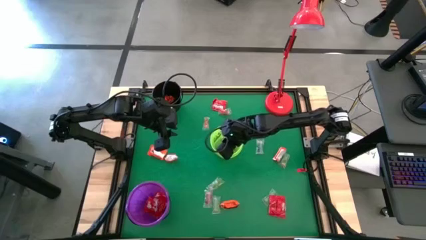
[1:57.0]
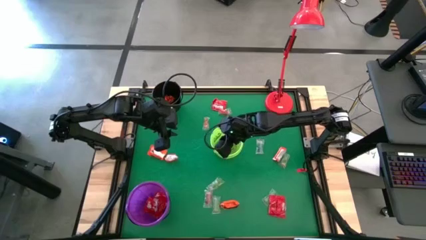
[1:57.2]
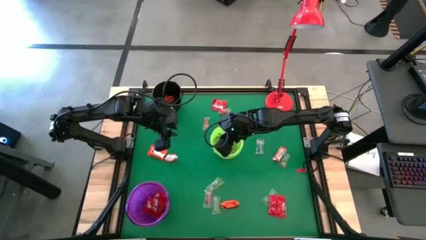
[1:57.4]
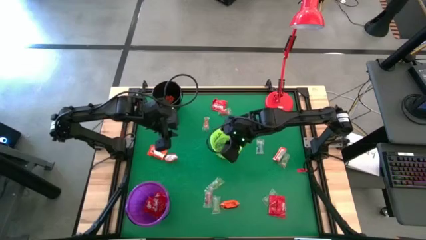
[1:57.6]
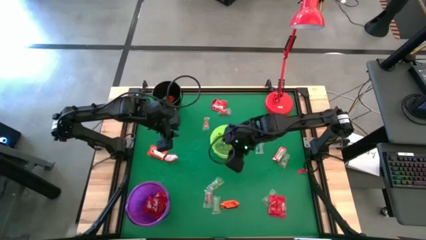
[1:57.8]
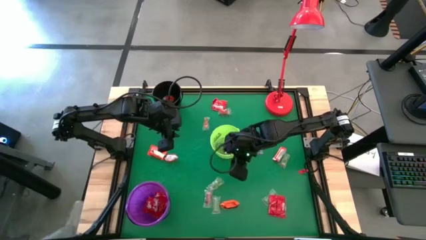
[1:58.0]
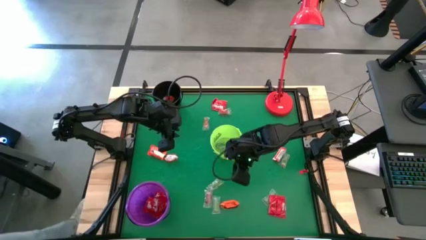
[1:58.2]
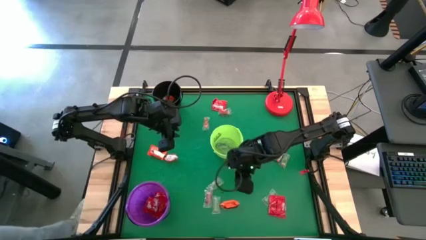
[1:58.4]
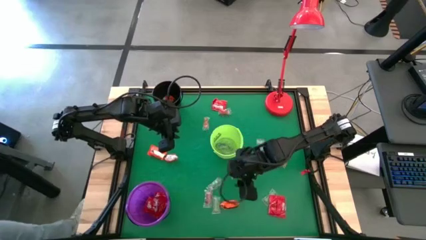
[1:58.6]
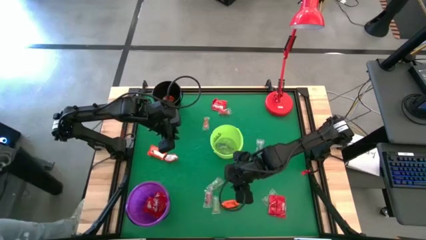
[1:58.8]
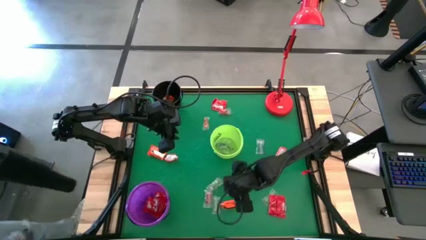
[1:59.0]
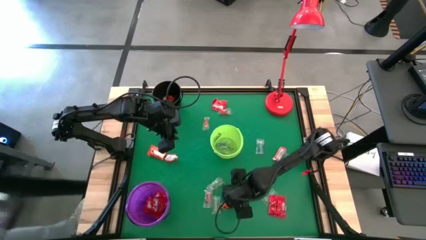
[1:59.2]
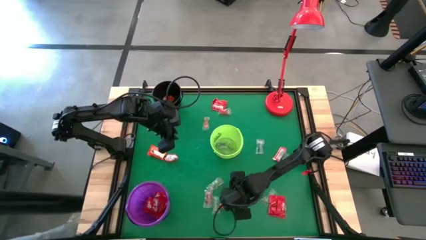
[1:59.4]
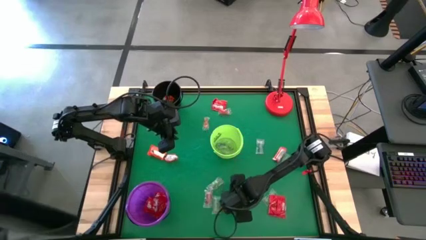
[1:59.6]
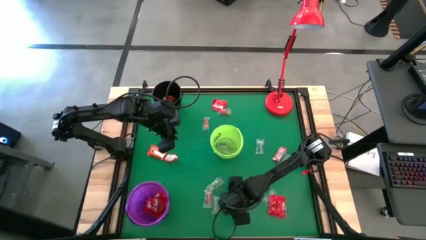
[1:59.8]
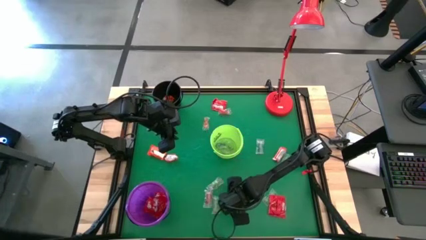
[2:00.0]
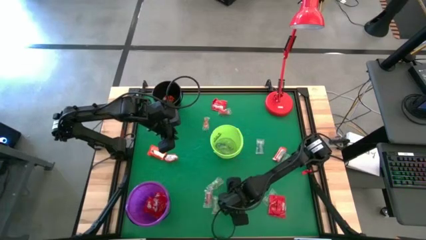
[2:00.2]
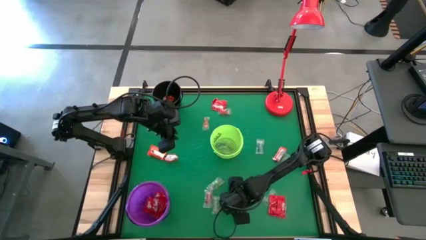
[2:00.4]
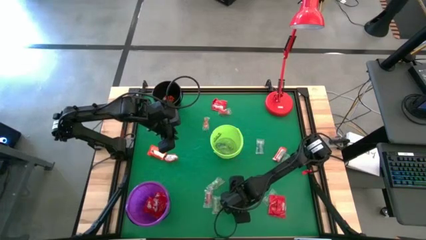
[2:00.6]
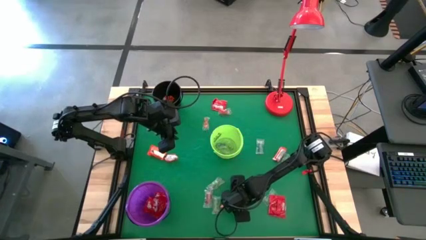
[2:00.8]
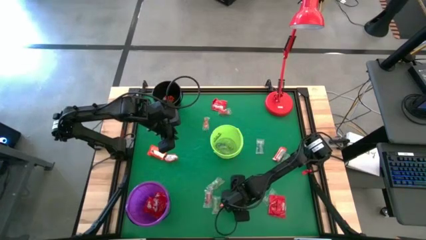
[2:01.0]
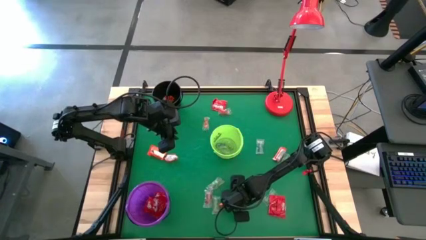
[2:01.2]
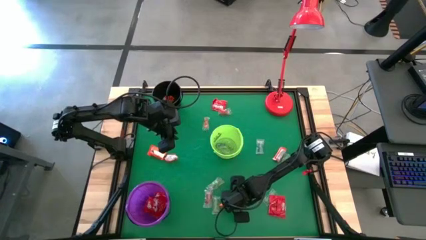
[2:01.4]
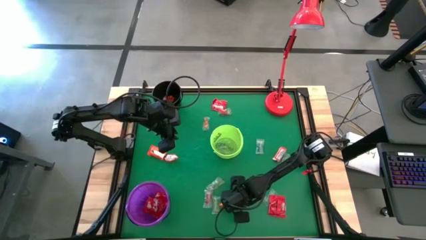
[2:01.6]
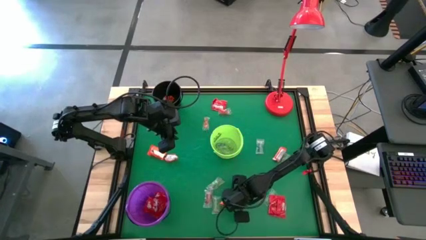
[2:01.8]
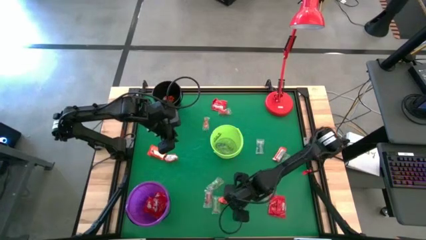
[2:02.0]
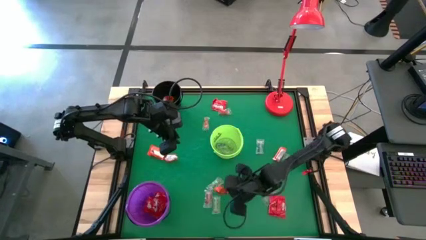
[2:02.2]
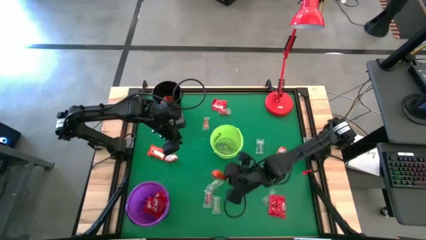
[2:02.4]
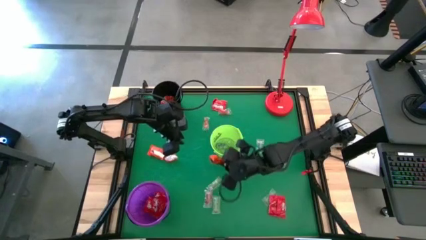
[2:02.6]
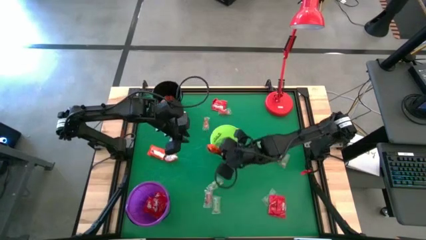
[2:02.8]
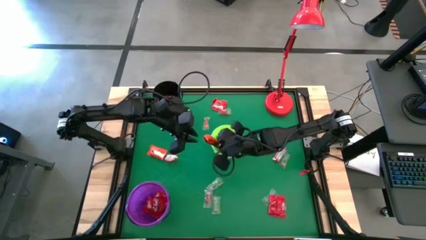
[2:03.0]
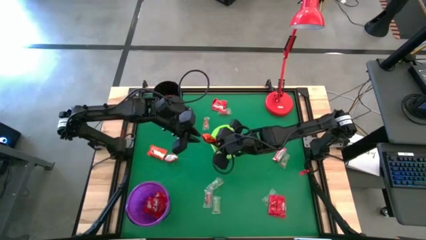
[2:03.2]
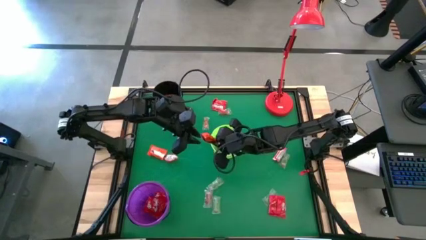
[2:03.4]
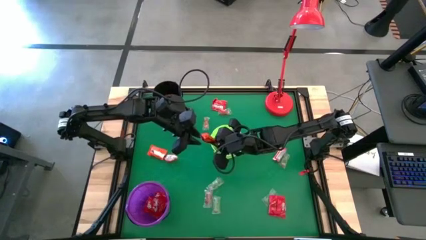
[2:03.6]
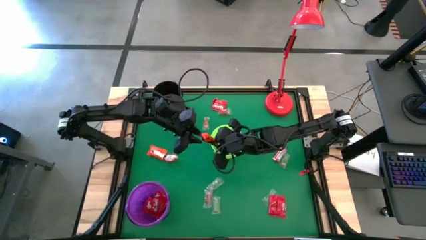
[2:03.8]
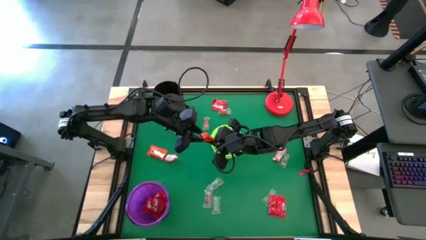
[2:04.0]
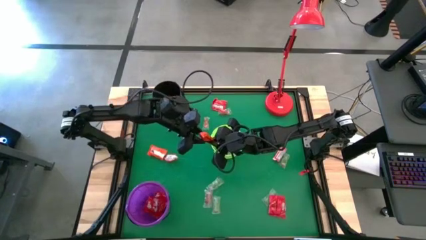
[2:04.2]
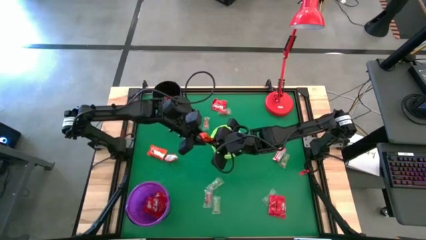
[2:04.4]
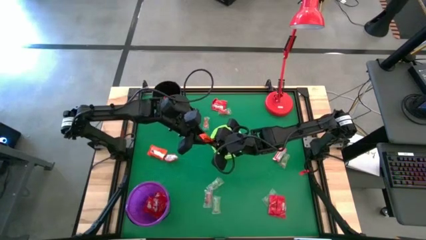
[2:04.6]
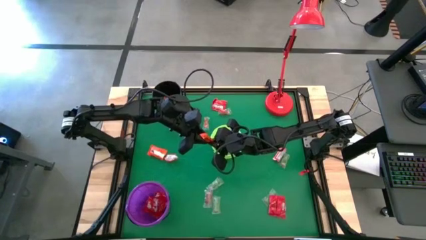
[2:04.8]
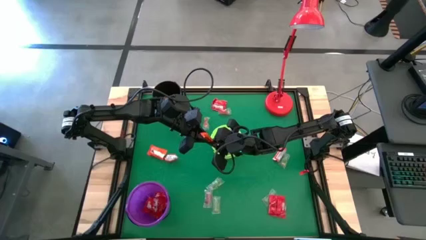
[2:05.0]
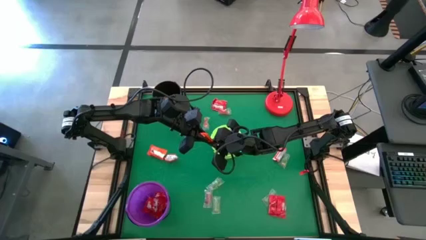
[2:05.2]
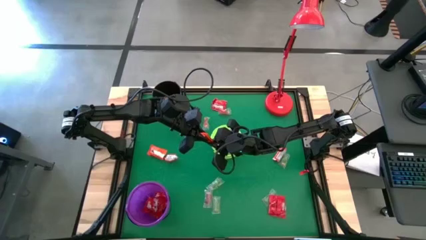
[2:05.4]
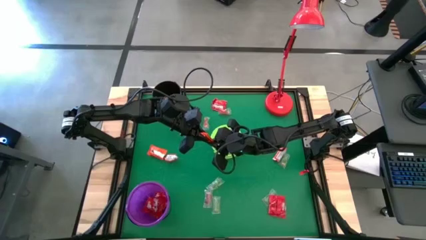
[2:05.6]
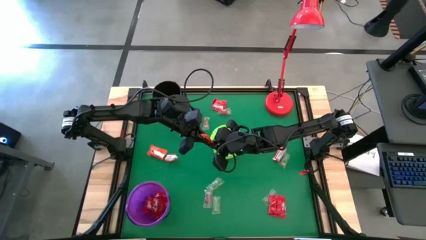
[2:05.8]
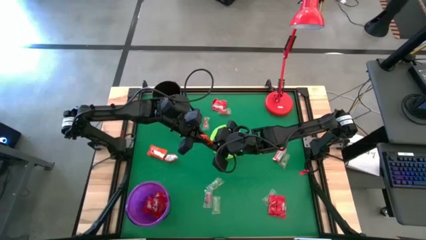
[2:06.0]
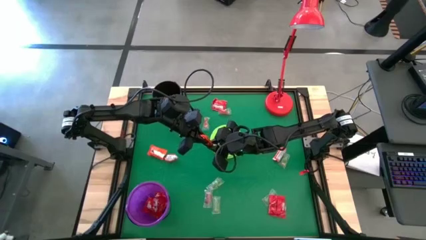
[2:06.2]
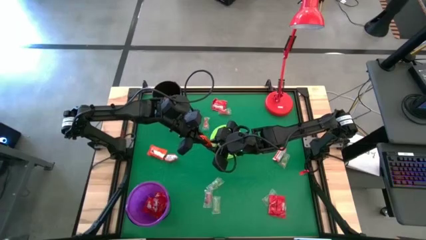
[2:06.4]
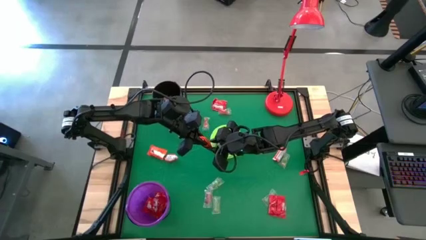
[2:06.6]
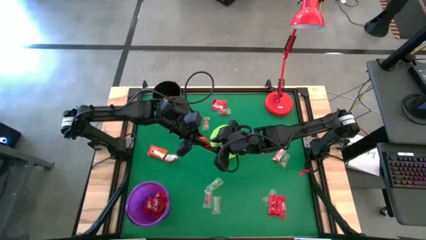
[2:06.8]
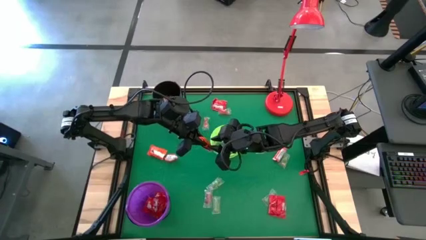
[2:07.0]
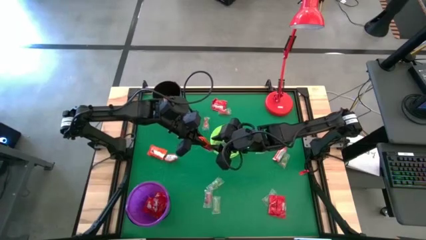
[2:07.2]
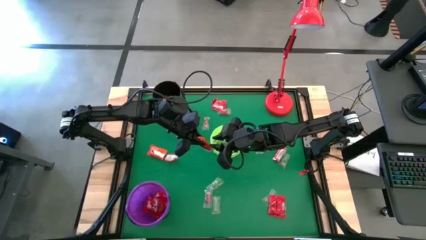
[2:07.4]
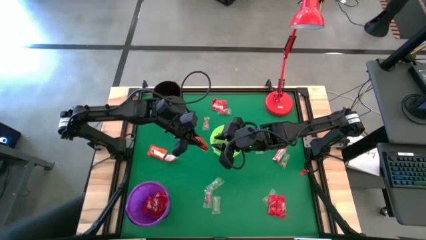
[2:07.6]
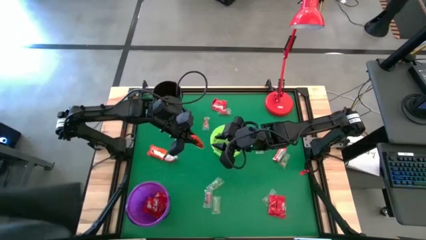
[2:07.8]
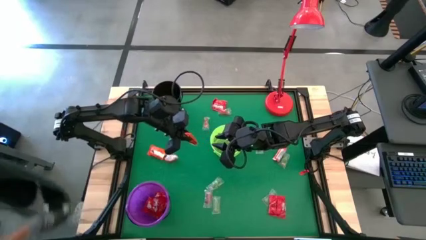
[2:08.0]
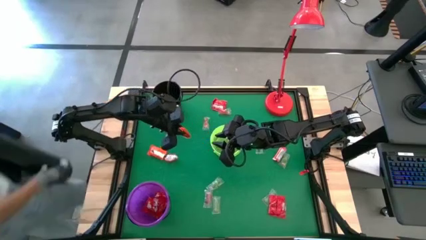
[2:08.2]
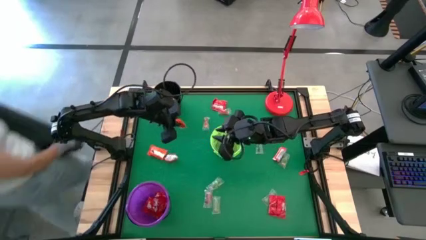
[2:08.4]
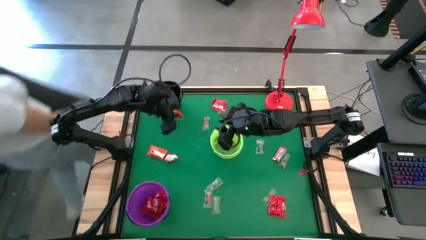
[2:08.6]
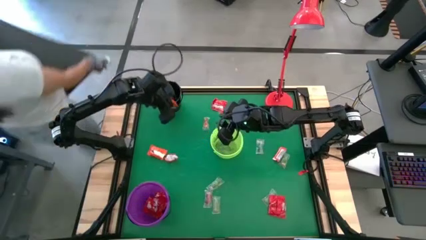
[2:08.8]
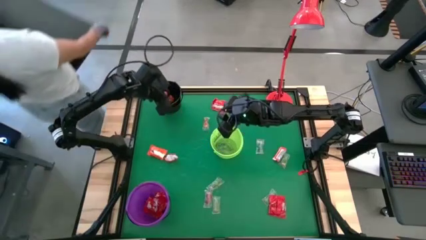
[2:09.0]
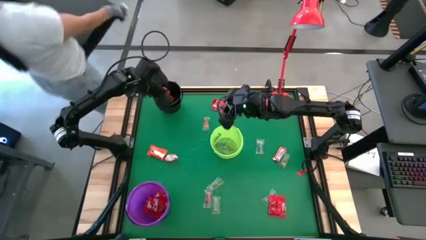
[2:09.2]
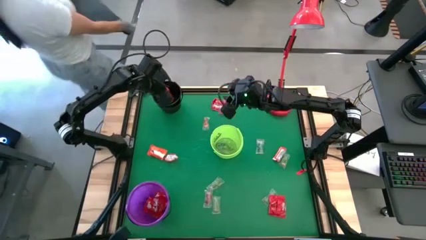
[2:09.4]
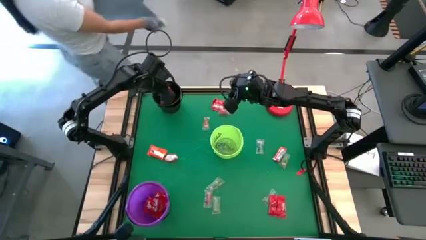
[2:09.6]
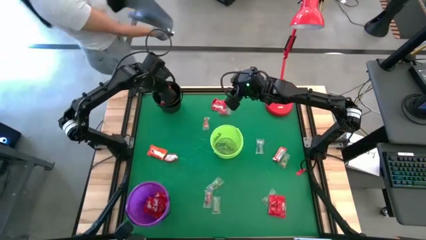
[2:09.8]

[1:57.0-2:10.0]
Task: Sort candy
Put the orange chocolate into the black bucket

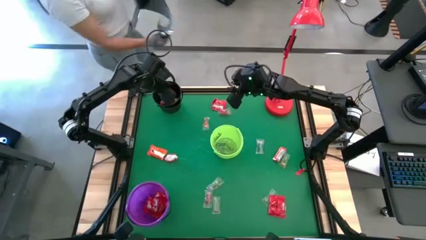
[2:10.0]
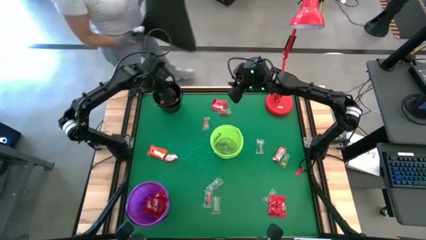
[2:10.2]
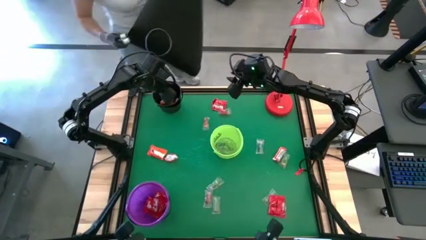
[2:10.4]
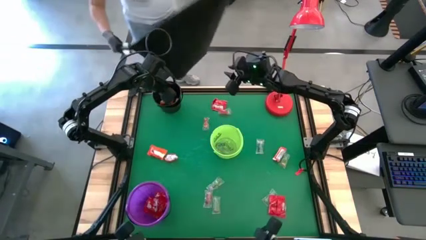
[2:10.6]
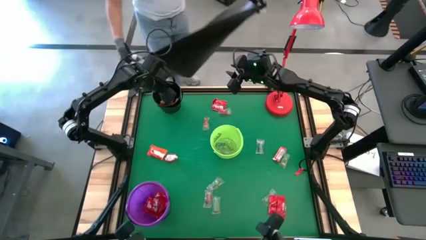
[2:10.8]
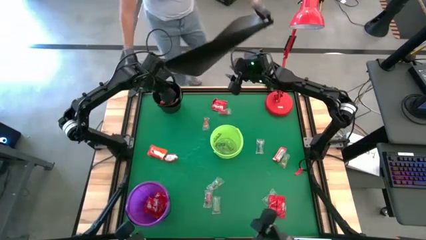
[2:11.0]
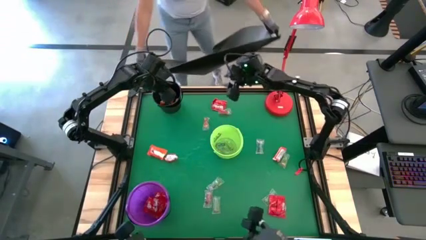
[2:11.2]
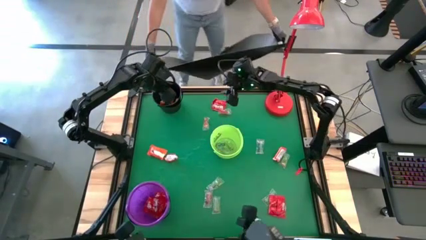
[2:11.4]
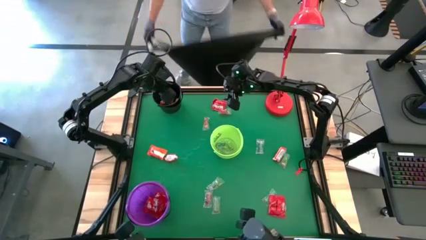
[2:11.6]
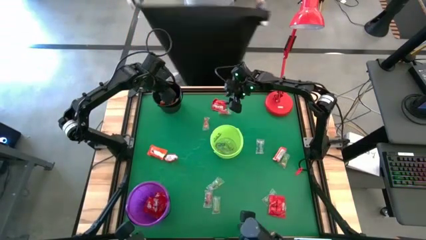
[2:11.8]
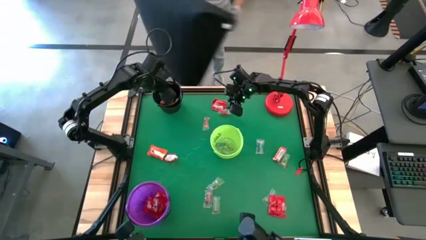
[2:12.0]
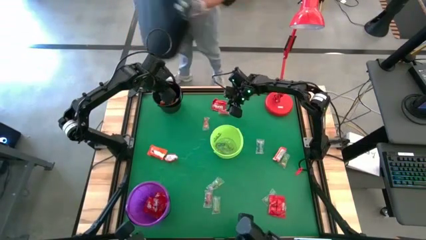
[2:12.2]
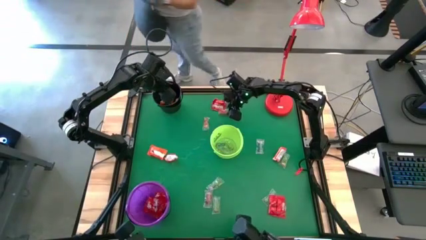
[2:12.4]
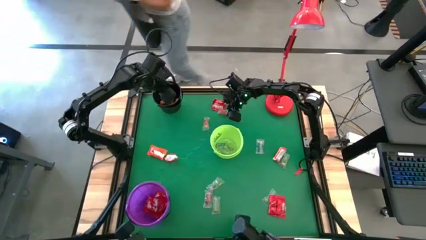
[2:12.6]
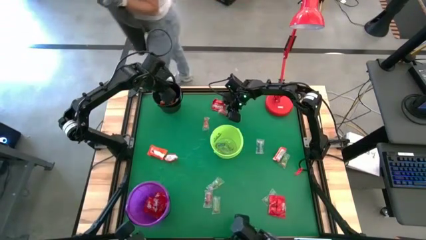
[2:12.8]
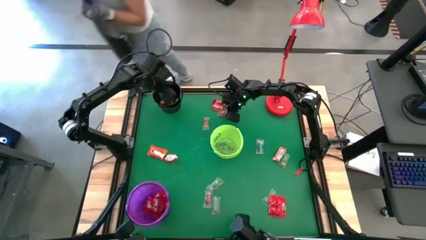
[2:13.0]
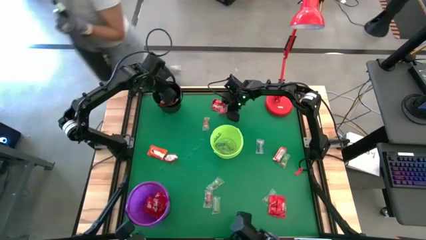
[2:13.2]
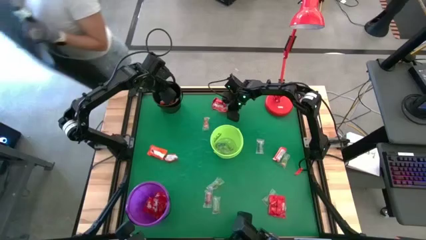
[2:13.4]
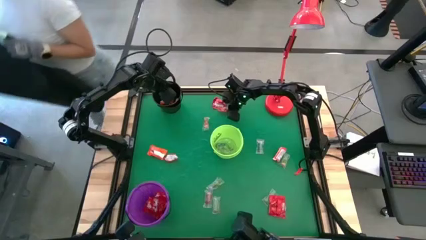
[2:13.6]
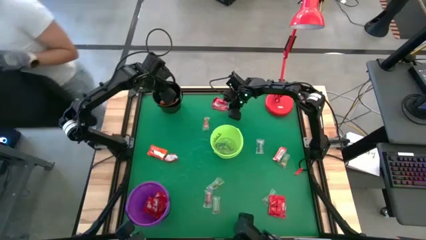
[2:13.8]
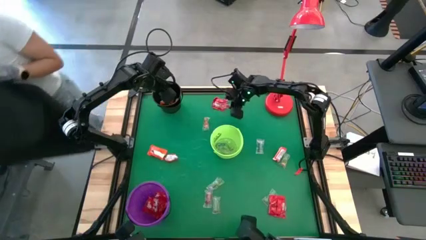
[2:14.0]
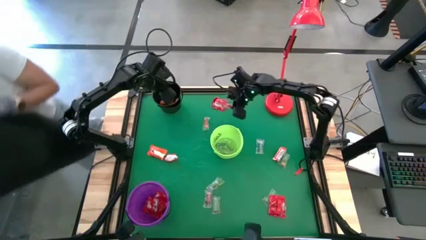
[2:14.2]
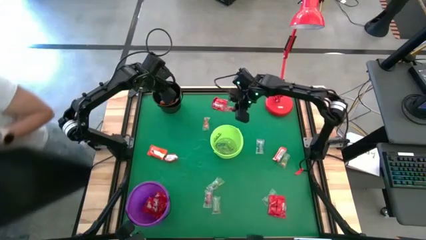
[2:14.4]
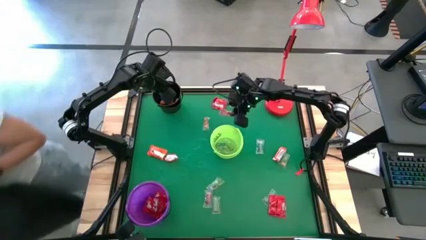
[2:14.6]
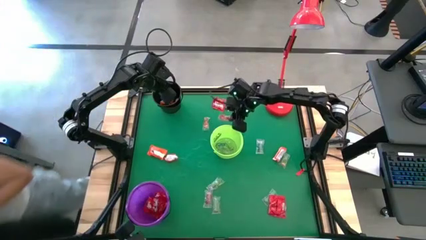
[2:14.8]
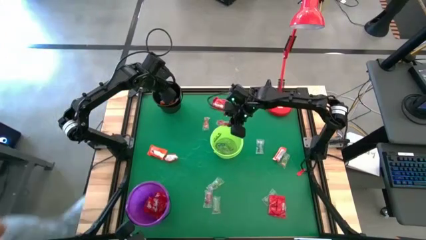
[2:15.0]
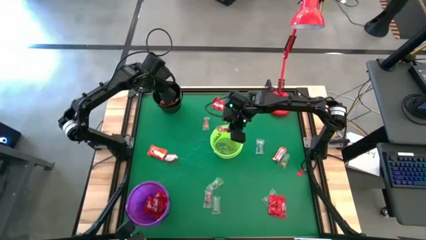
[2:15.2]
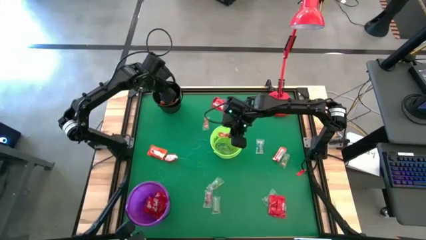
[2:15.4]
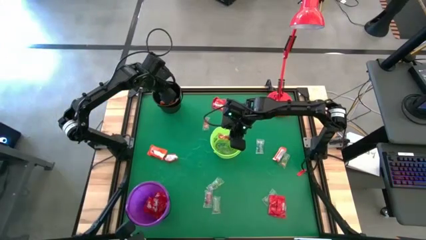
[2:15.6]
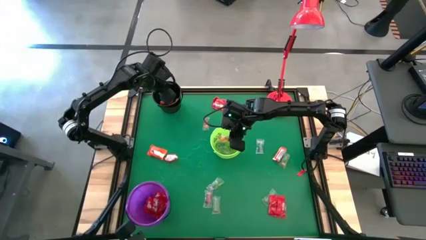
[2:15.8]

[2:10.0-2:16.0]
Put the red gummy into the green bucket
